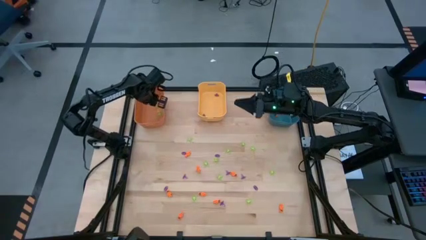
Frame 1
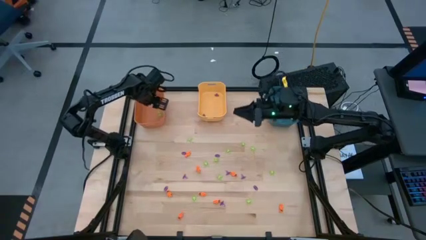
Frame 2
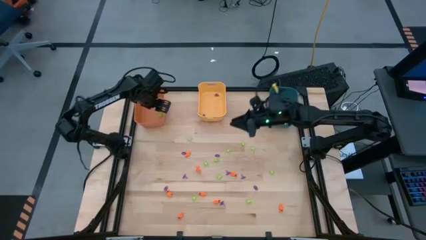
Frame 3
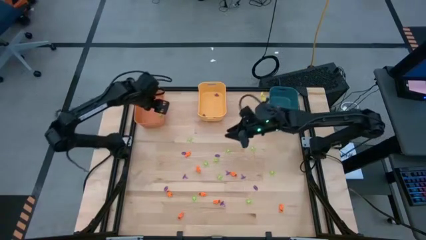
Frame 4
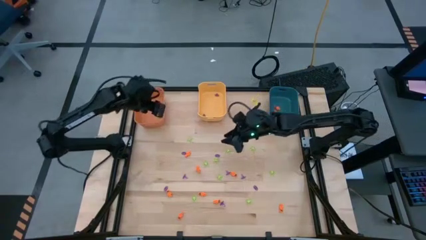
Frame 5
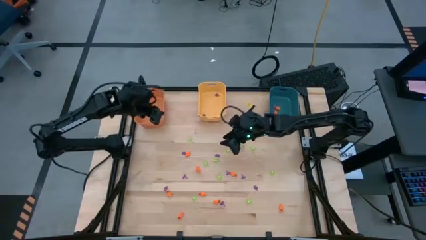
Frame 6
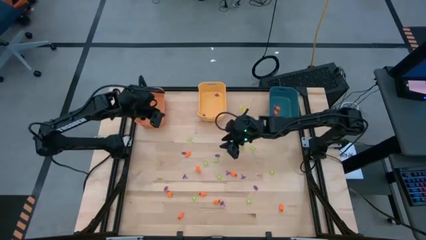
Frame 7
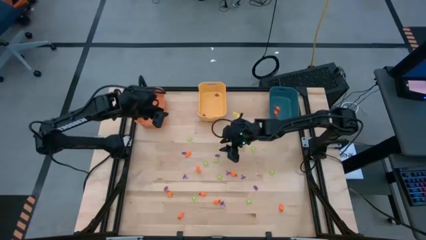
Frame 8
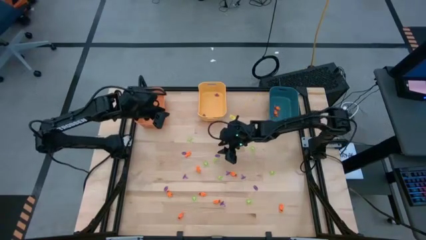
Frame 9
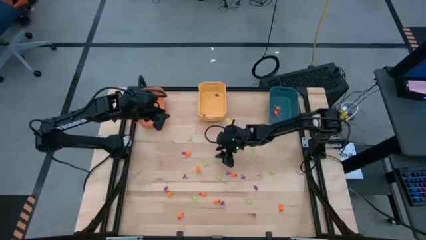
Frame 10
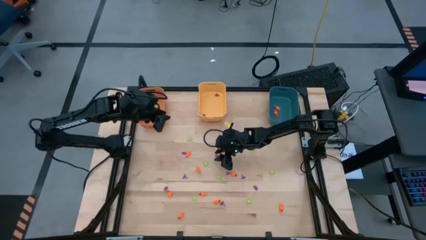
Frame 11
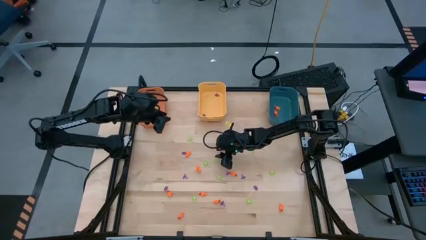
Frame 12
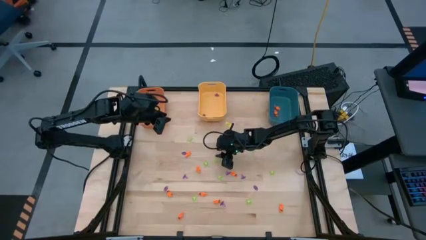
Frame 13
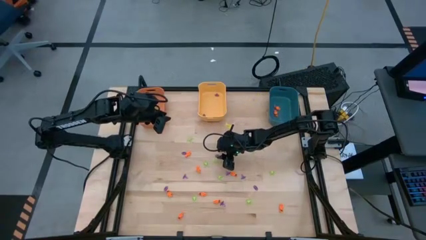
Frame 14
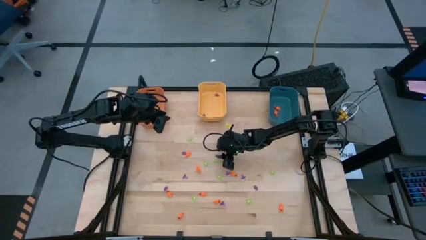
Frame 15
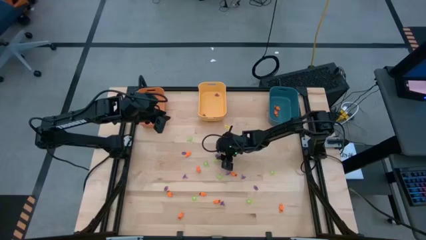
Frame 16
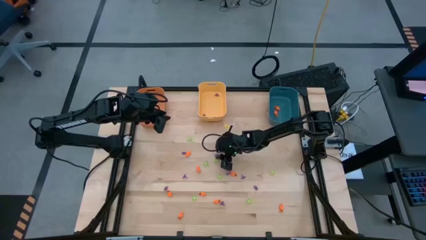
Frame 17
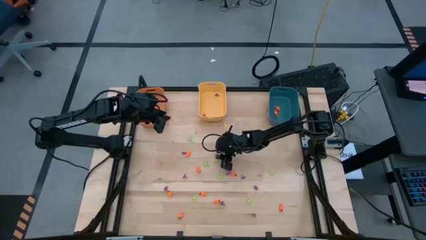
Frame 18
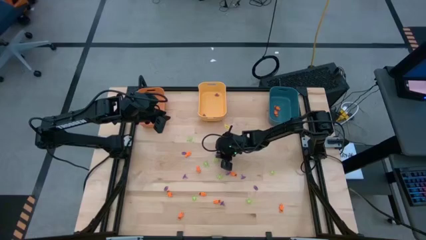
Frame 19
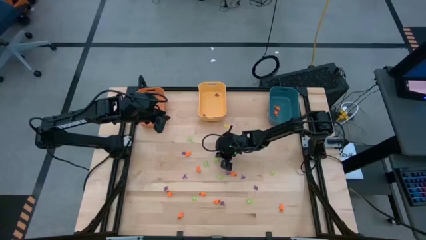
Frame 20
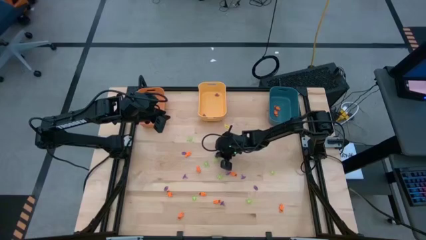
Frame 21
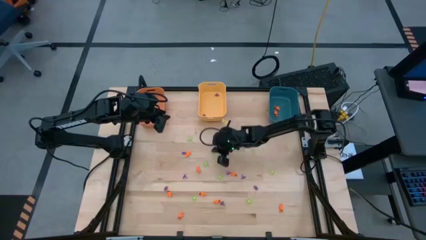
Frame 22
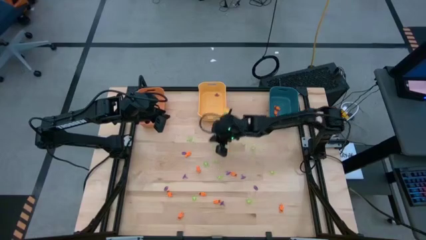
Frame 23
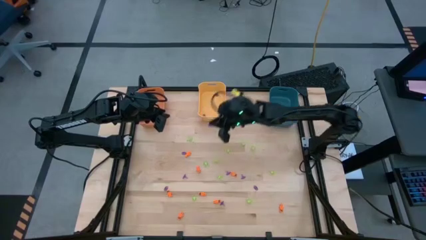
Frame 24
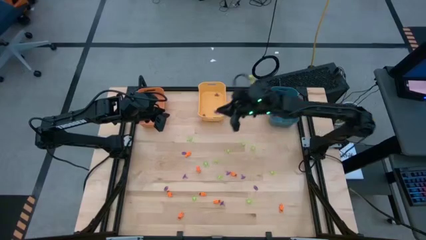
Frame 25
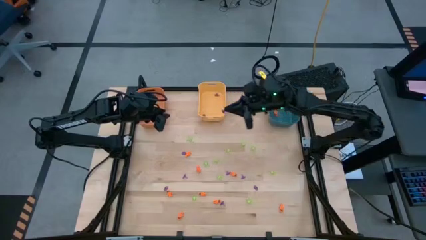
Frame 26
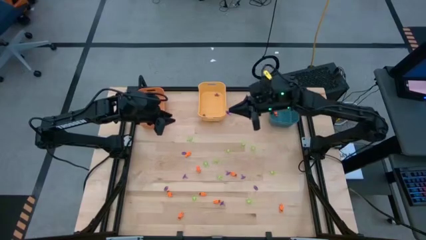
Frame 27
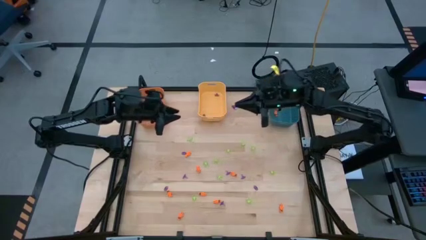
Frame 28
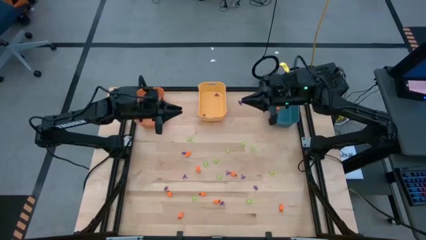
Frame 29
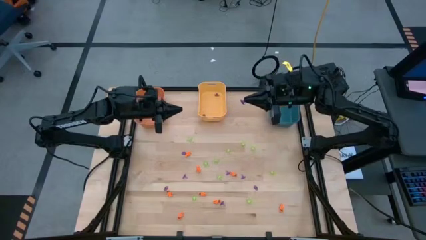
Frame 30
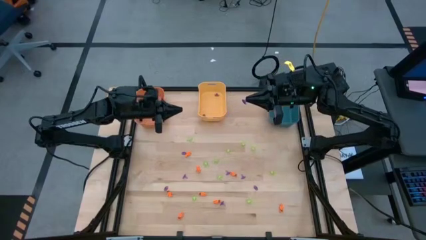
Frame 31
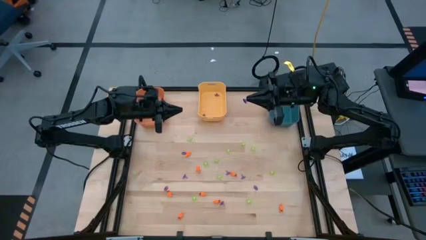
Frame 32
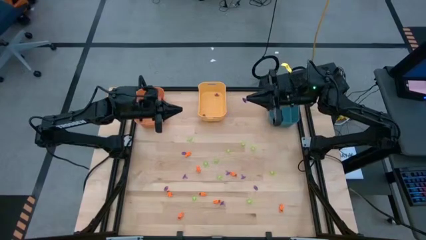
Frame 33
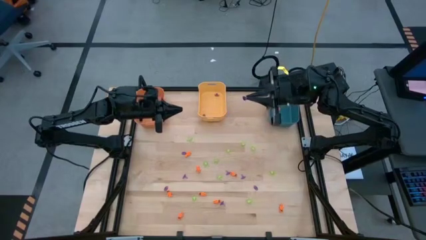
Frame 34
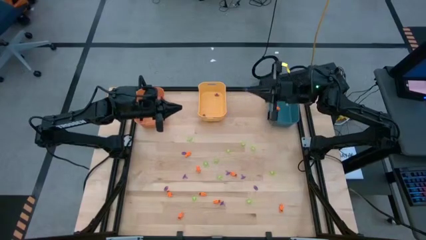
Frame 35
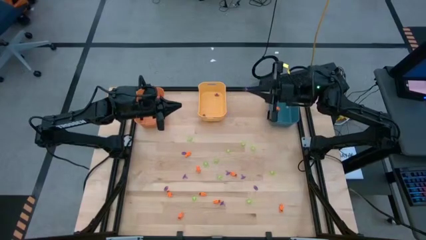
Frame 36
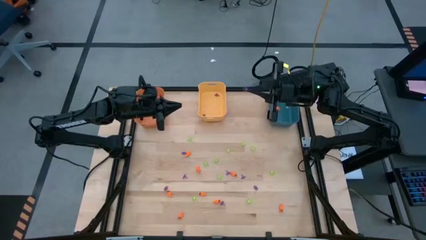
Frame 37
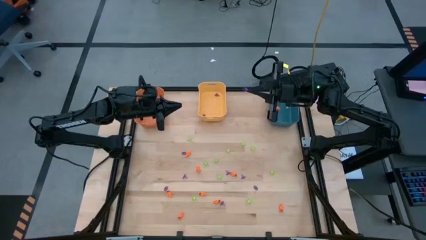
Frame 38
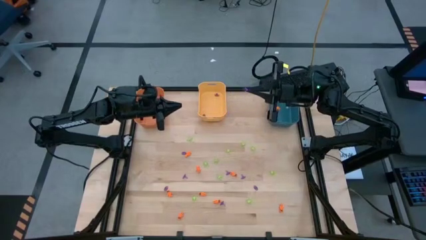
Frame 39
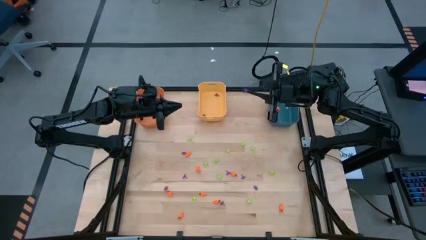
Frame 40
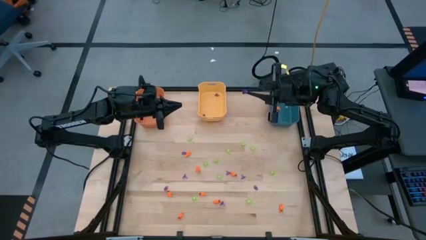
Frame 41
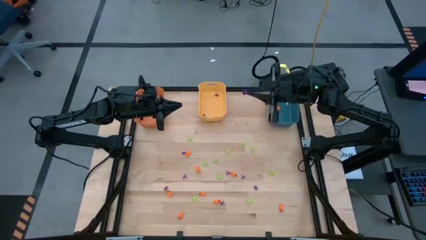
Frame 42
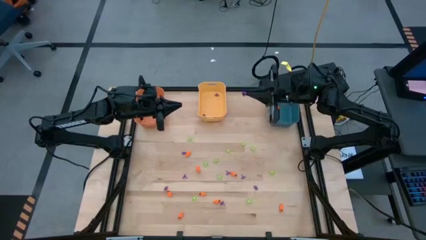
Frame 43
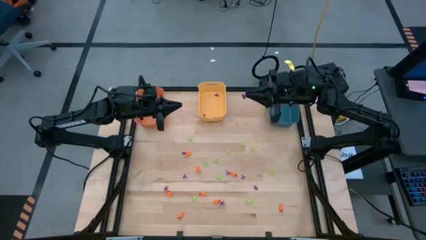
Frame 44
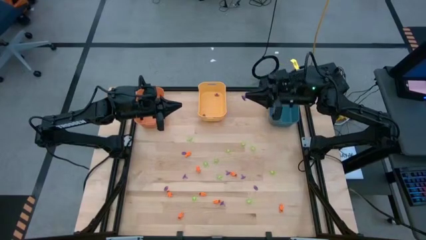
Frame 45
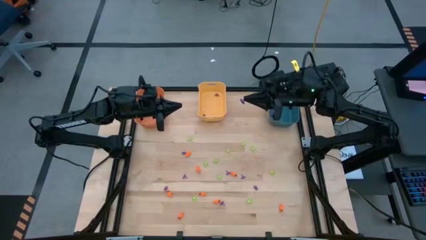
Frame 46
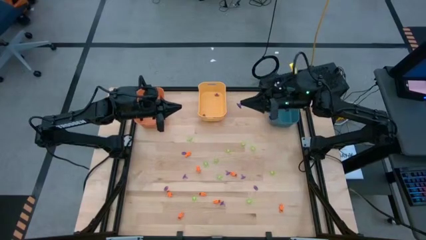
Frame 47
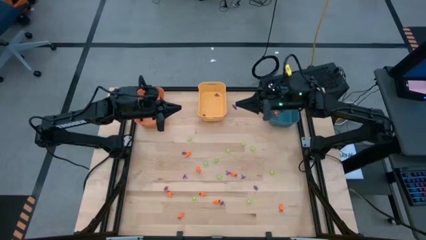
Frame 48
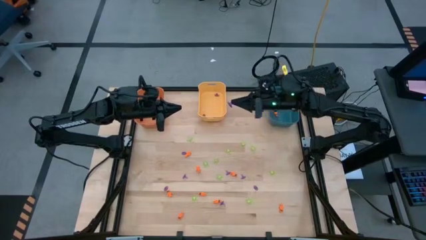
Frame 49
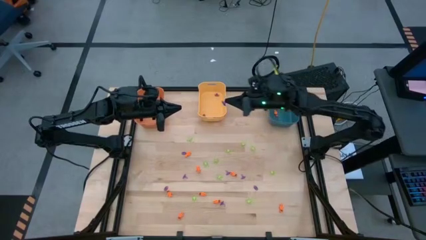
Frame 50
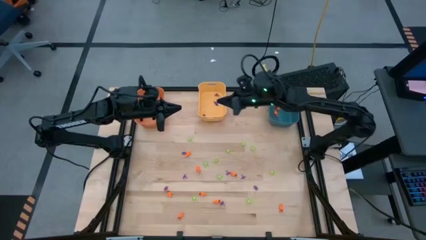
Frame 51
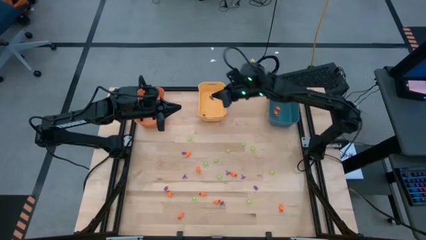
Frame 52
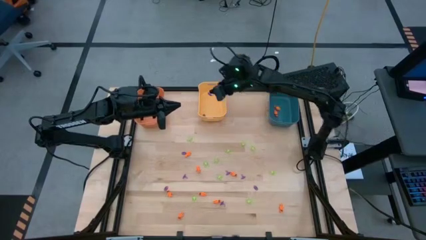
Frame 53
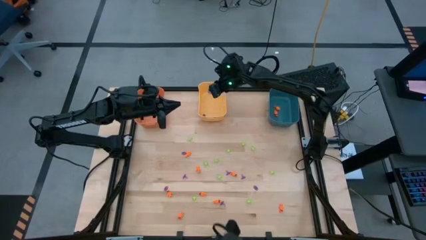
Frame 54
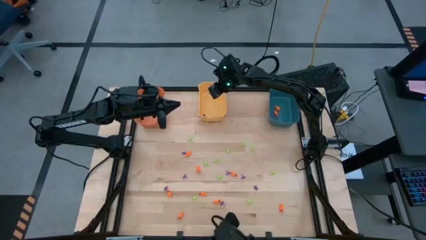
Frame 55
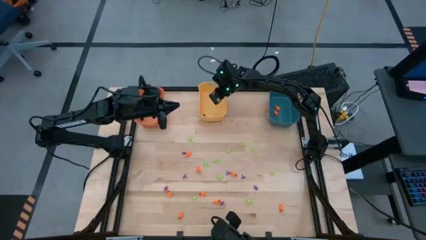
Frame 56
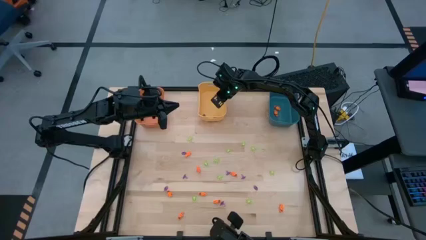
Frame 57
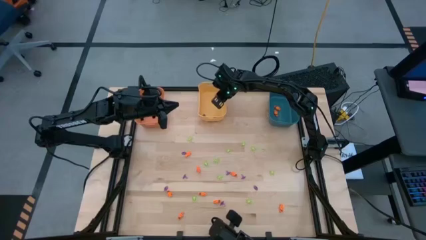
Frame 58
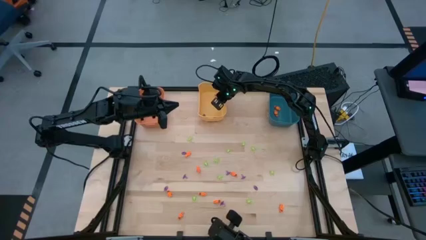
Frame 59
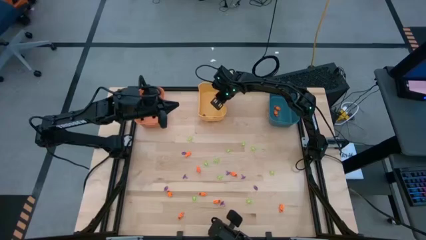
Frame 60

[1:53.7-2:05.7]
Task: Sort Halloween decoration
Put the purple witch hat toy into the yellow bin

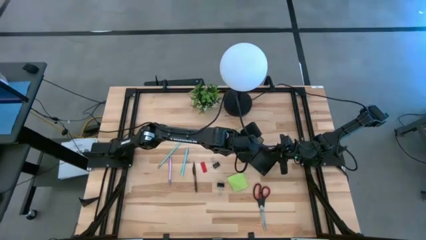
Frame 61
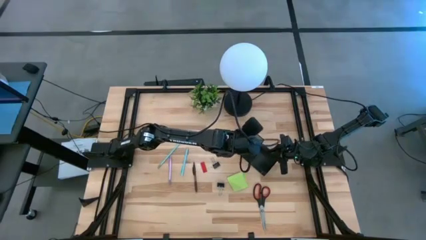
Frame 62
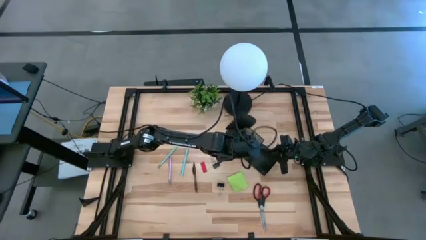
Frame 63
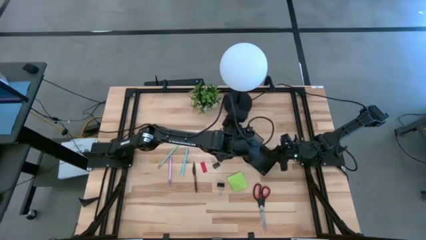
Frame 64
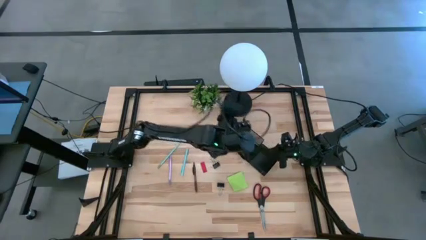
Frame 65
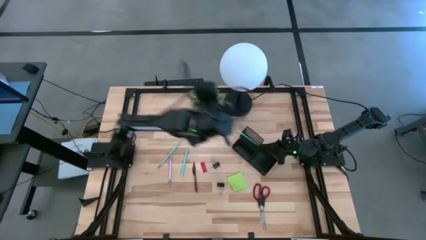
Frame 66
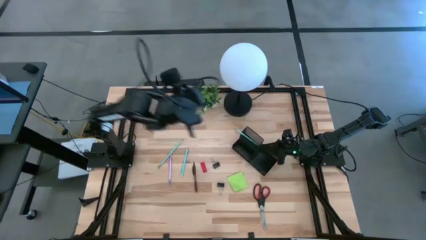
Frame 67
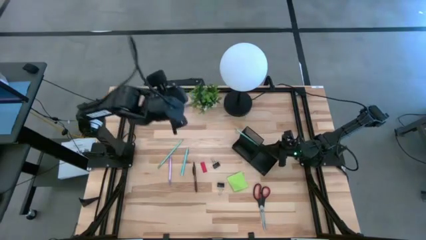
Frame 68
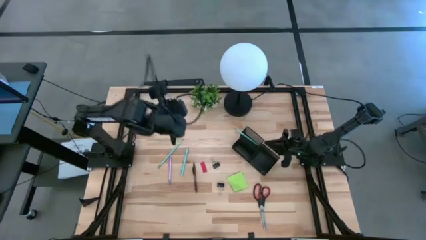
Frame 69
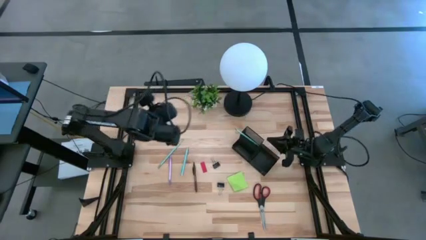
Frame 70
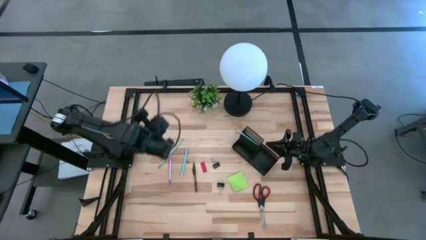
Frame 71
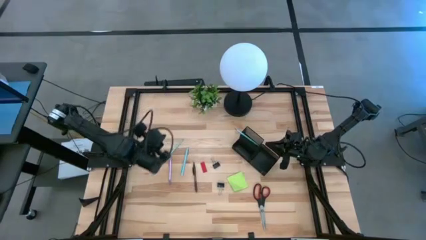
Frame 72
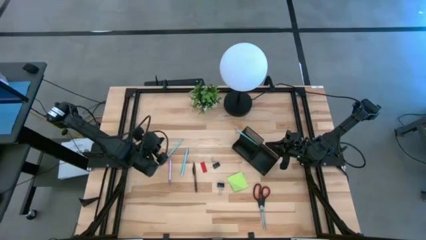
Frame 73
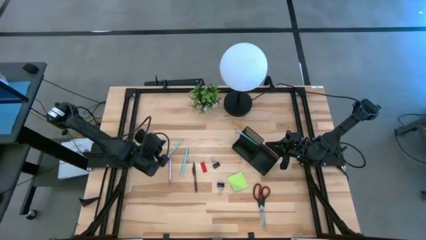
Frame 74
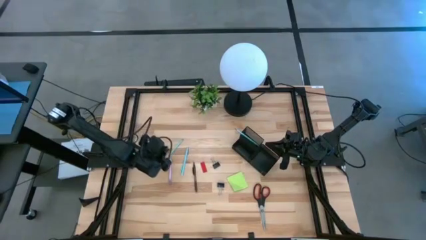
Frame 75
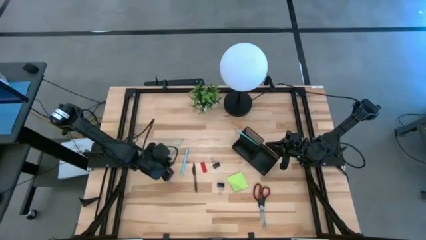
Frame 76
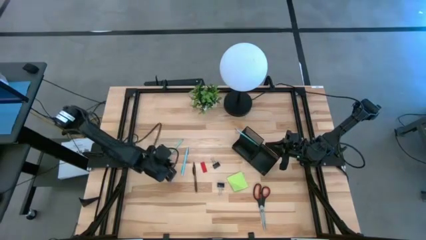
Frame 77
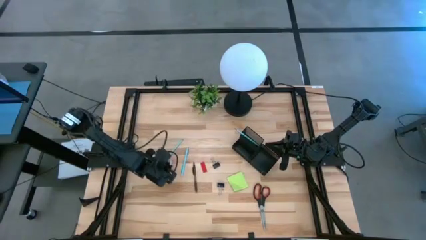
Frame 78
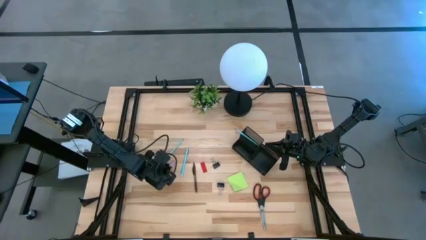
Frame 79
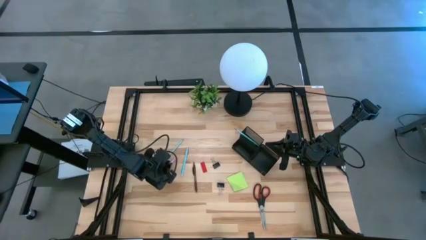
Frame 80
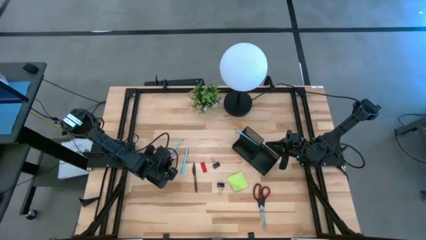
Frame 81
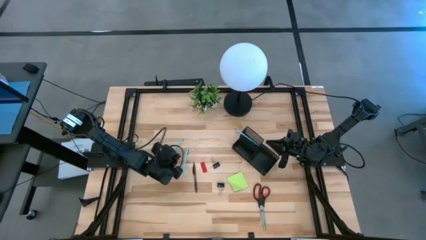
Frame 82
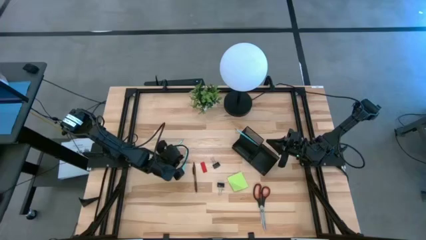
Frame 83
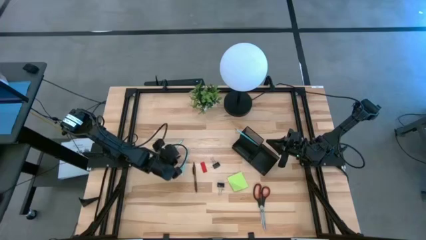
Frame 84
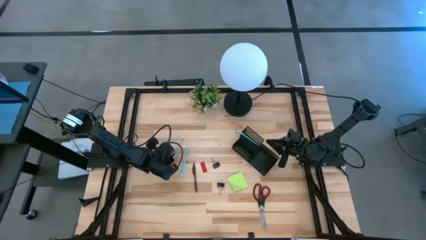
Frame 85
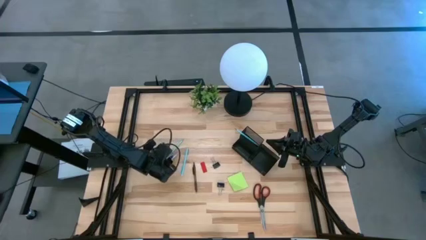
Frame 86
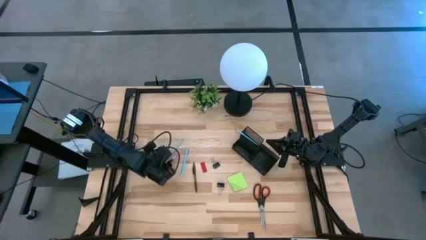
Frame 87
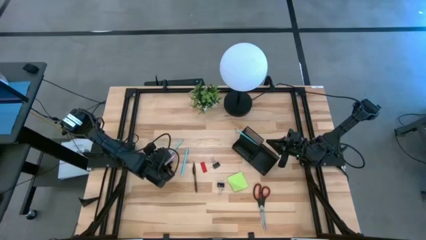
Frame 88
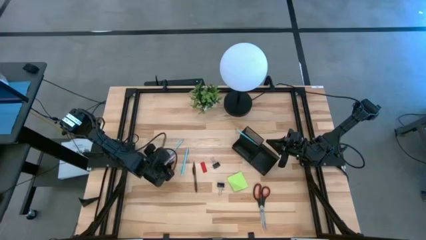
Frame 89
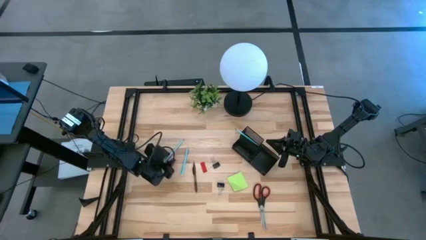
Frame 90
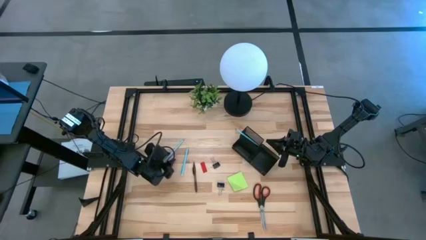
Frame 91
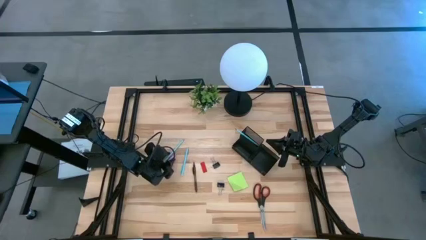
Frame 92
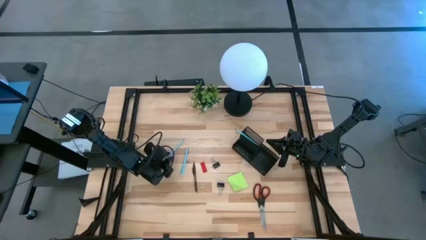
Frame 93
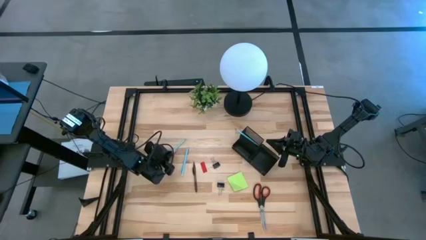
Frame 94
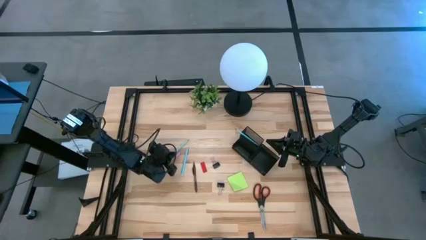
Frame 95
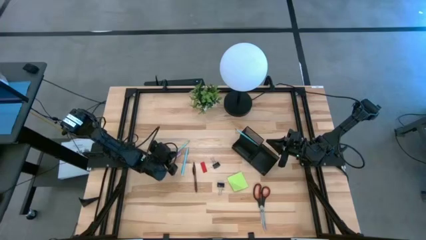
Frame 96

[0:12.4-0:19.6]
Task: Pick and place office supplies into organizer
Put the violet pen into the desk organizer
